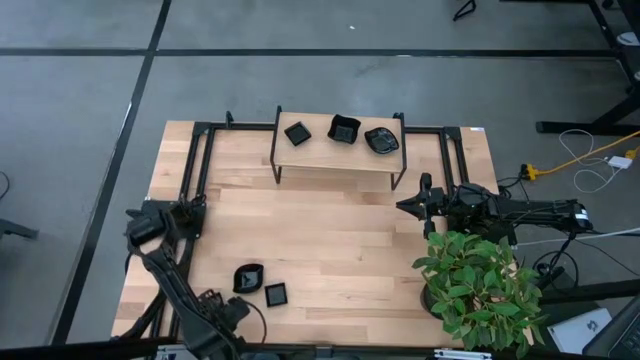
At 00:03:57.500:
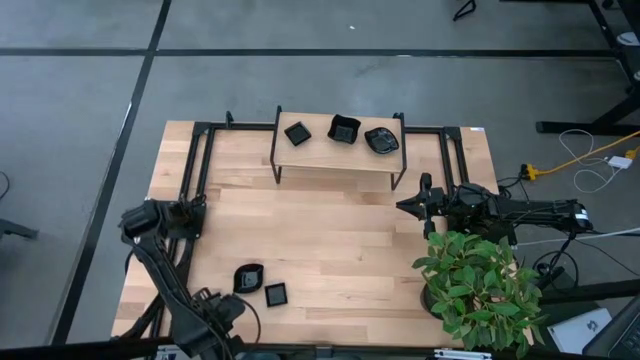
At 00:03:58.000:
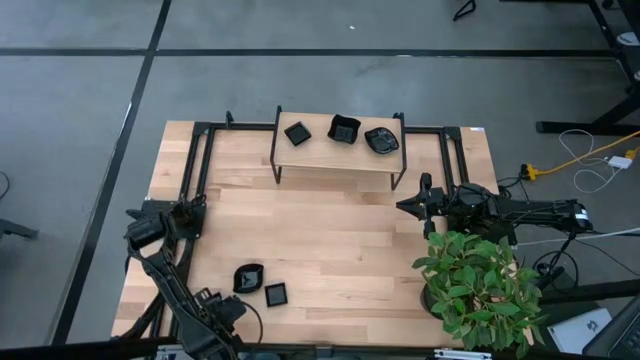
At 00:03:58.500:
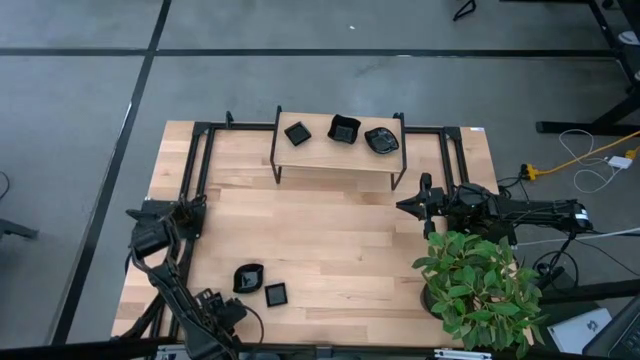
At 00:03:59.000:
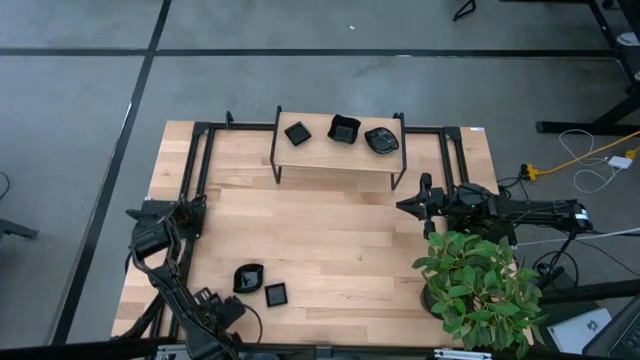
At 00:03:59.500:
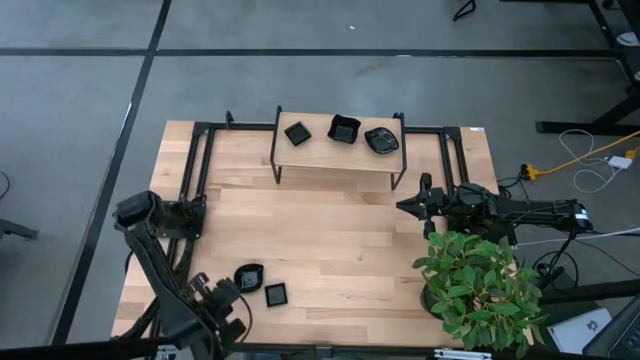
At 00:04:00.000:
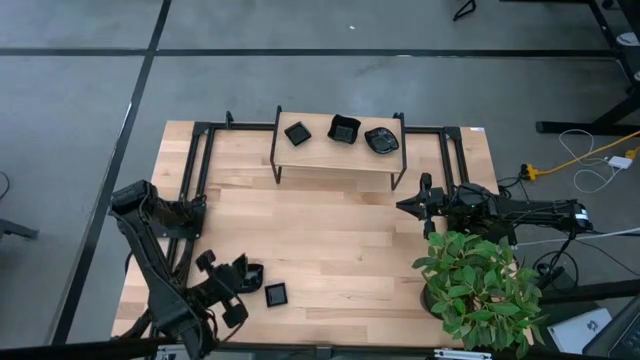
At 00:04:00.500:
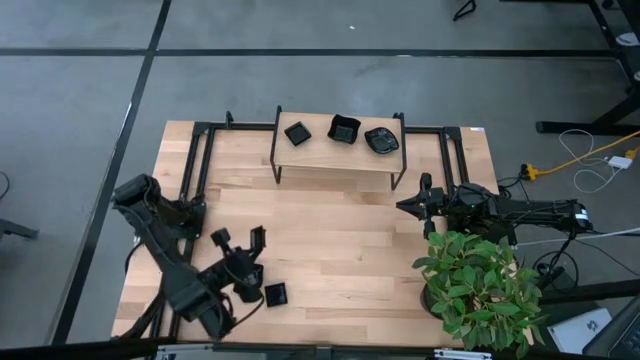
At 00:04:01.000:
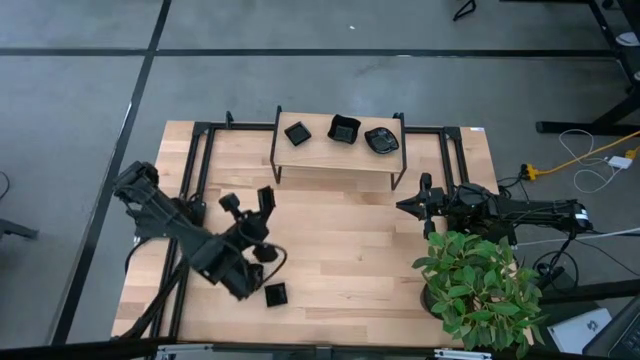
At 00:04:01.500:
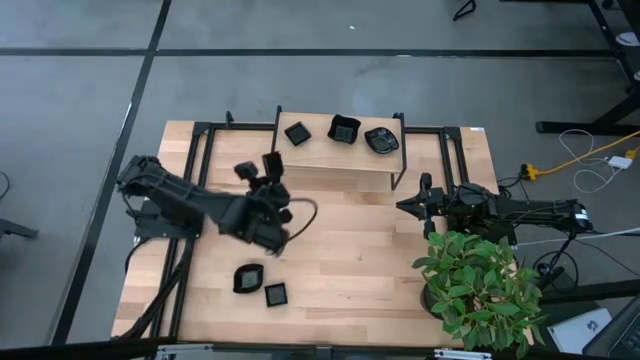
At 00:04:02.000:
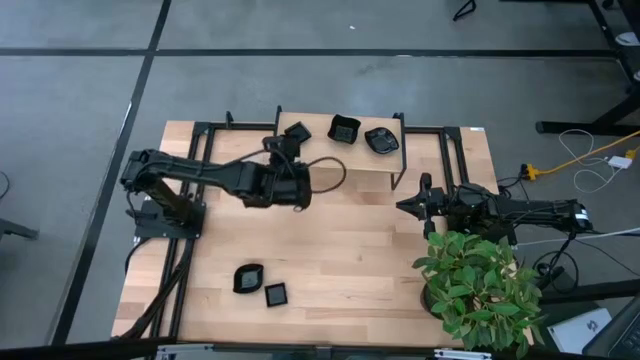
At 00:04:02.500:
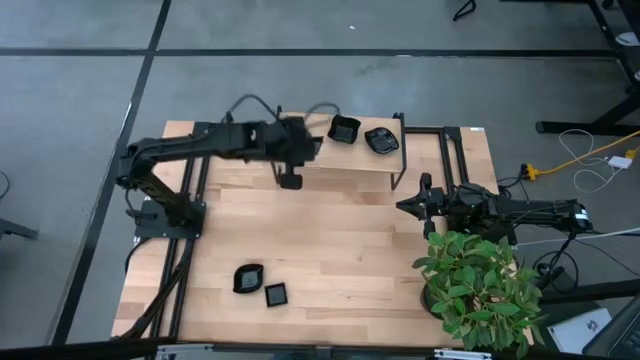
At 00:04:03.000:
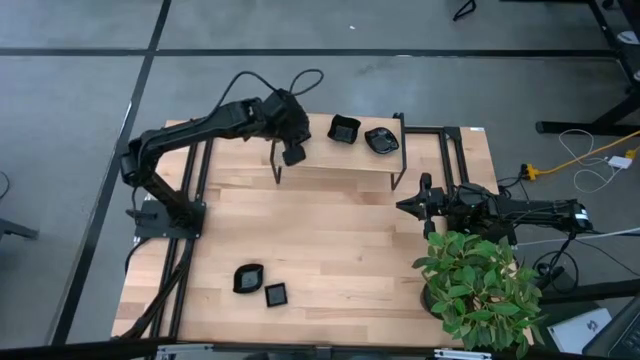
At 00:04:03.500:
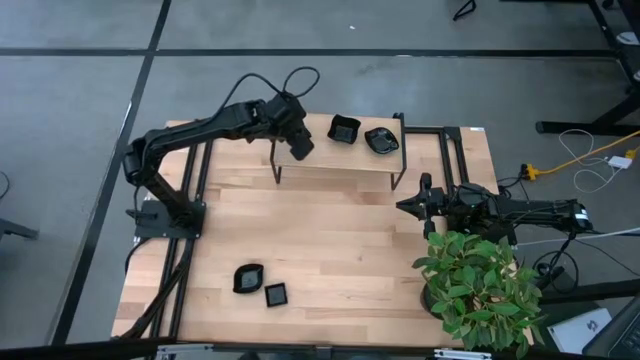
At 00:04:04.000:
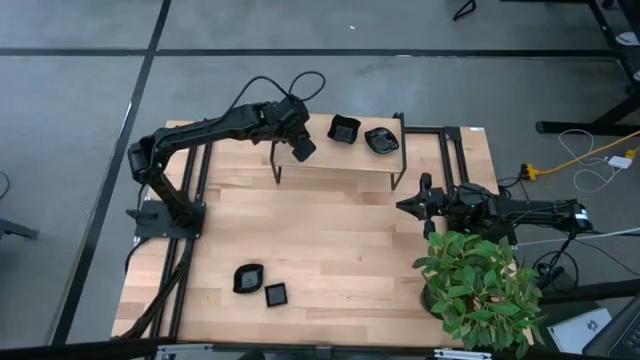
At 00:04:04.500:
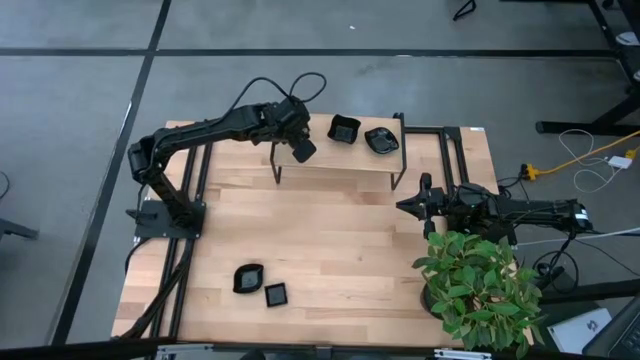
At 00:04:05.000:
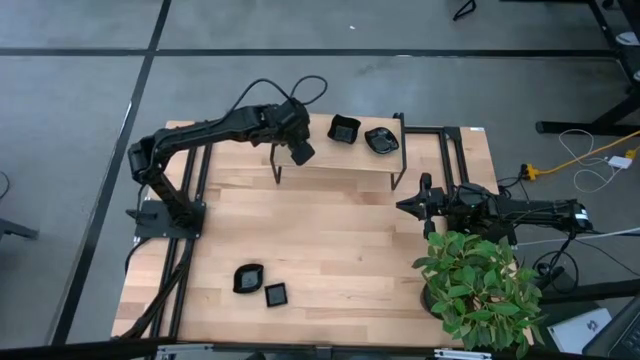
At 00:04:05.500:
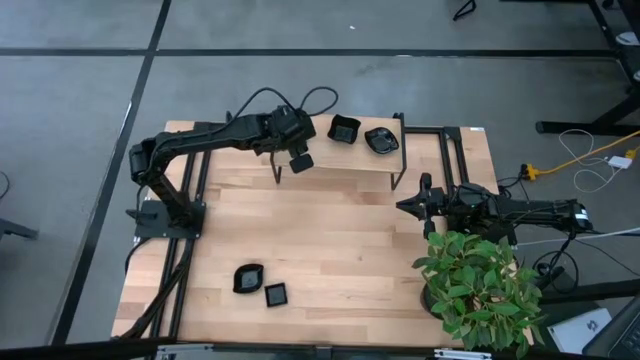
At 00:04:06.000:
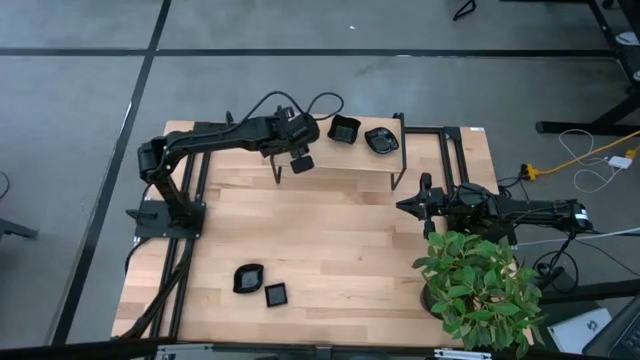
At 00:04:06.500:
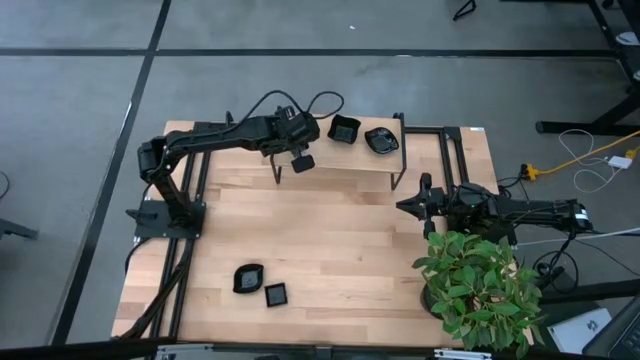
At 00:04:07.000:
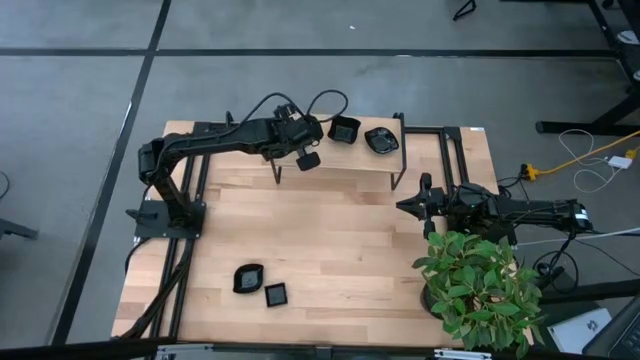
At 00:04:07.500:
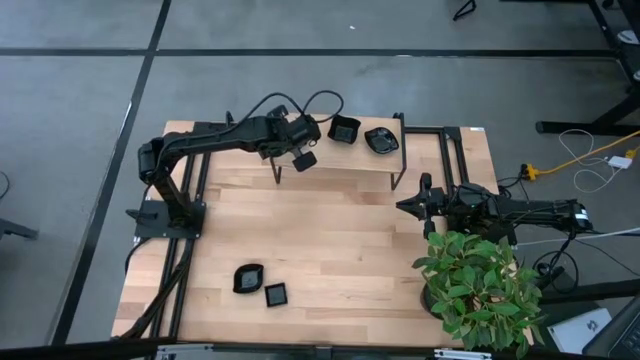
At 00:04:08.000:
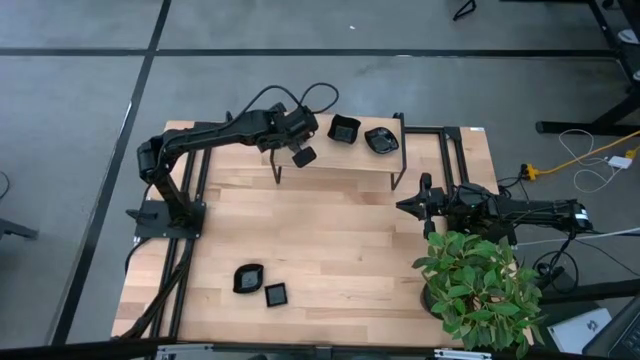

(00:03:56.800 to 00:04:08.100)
Task: Pick & Place Mini shaped plates
Stack the square plate on top of the square plate on the shelf

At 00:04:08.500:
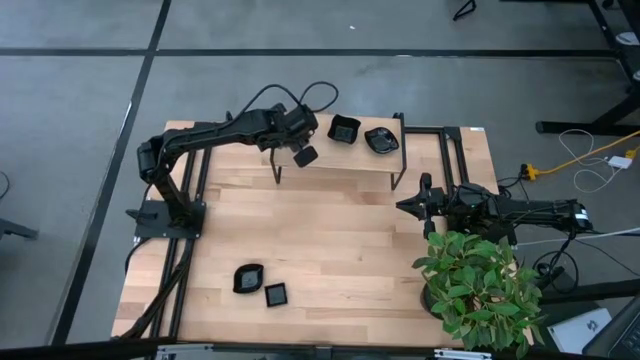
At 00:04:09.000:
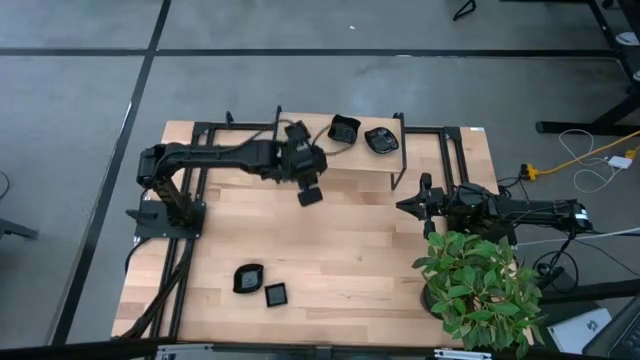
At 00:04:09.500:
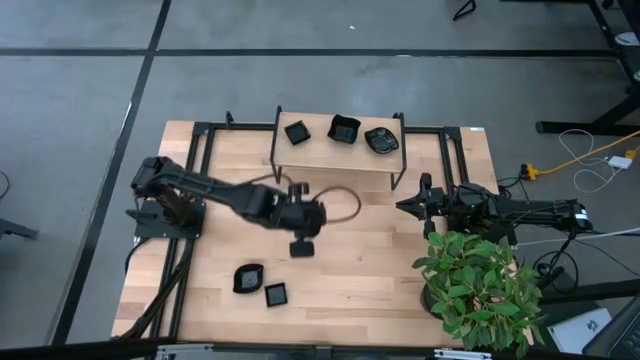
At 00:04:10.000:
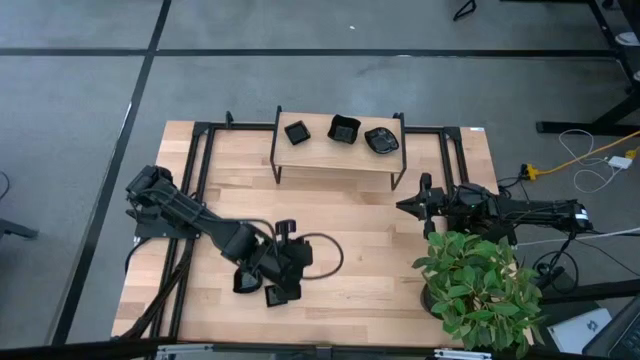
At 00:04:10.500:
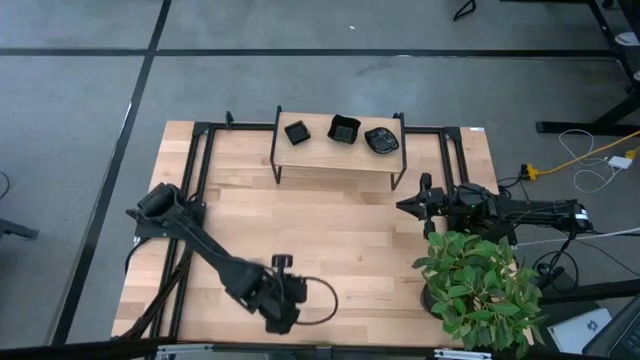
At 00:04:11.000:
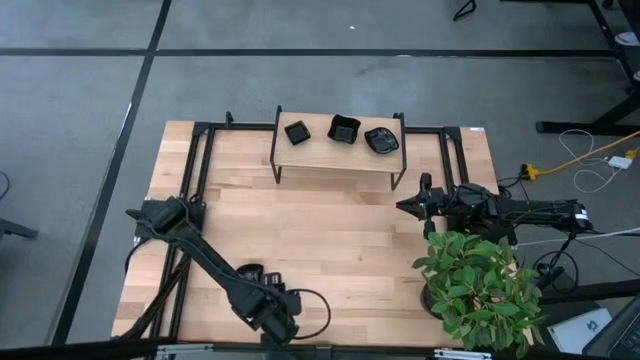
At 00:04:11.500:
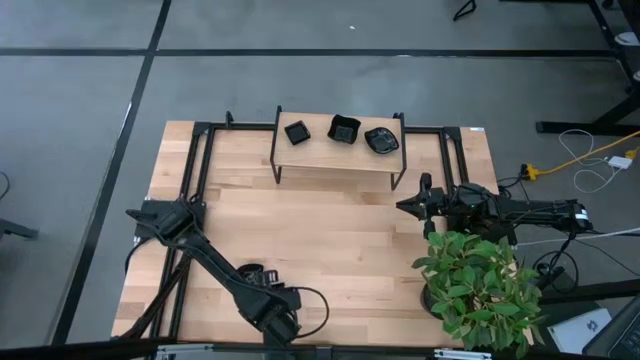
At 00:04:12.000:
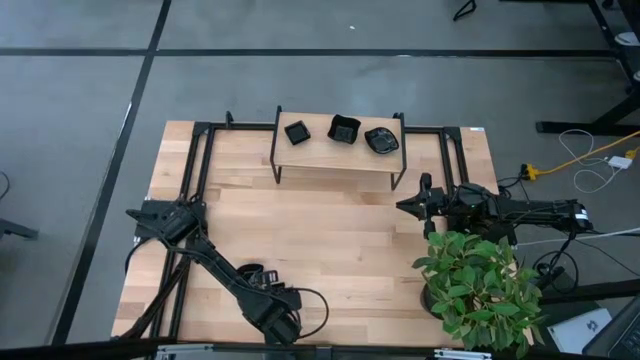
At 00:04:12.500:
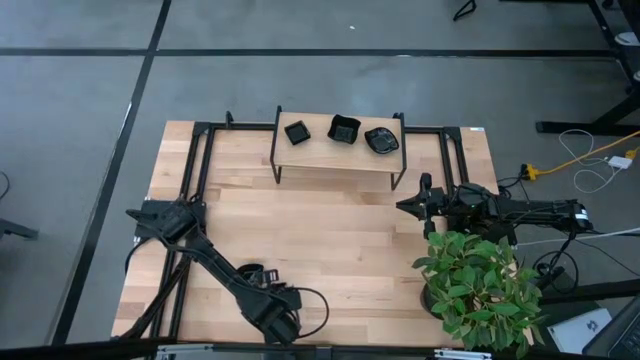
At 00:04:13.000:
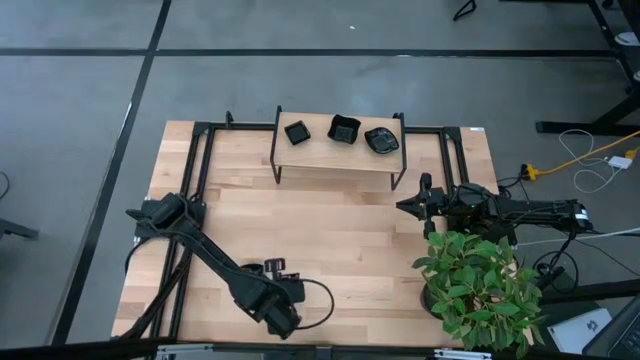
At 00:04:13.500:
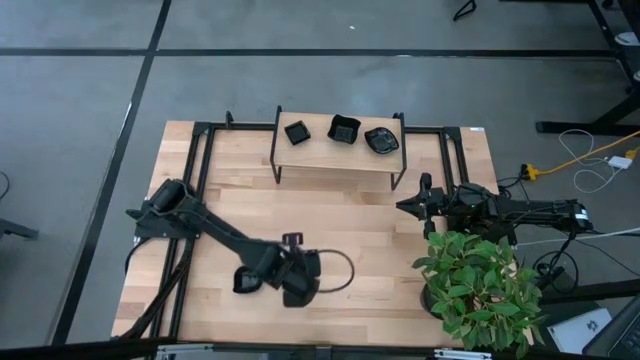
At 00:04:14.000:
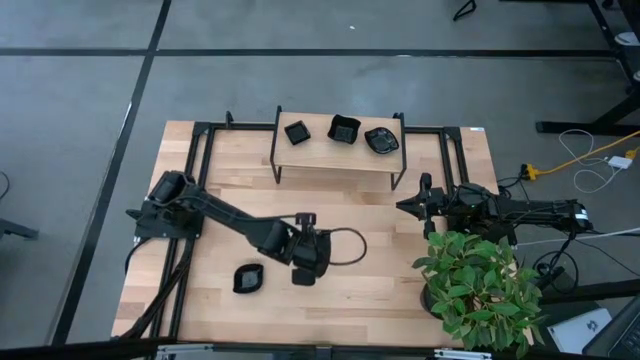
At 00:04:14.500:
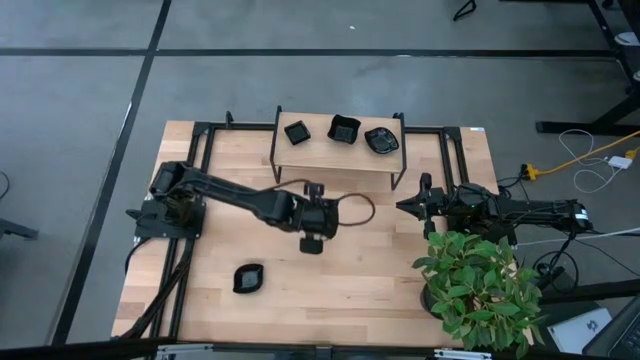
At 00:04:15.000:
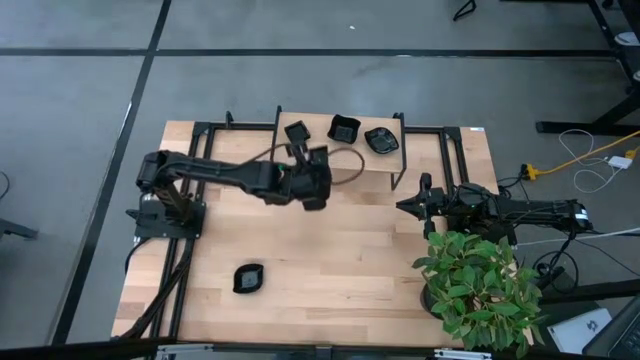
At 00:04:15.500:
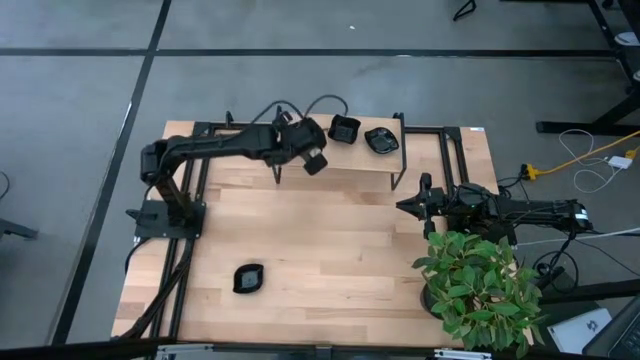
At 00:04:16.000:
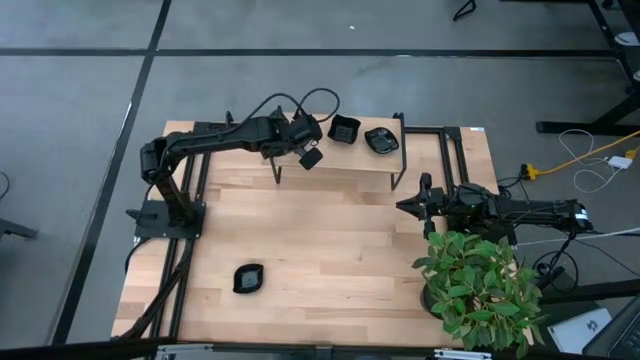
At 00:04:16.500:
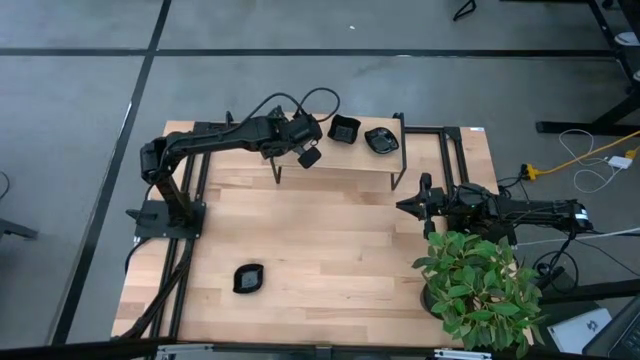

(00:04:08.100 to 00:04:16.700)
Stack the square plate on top of the square plate on the shelf

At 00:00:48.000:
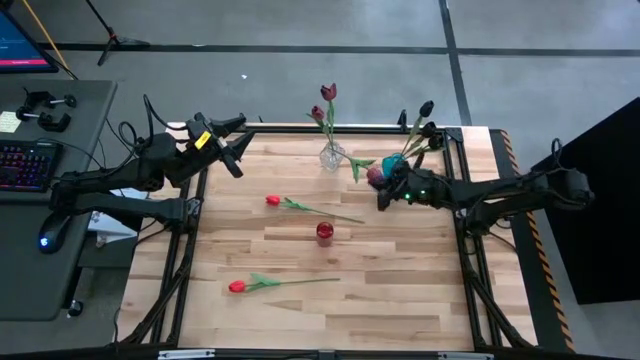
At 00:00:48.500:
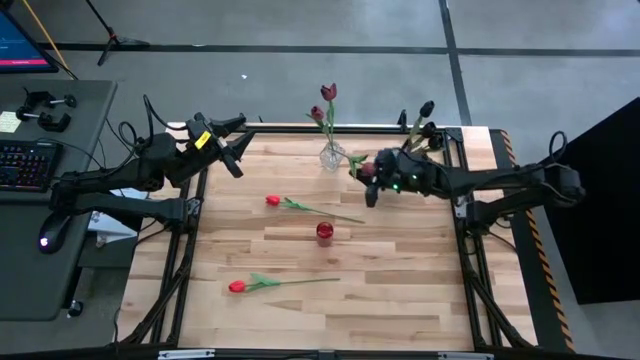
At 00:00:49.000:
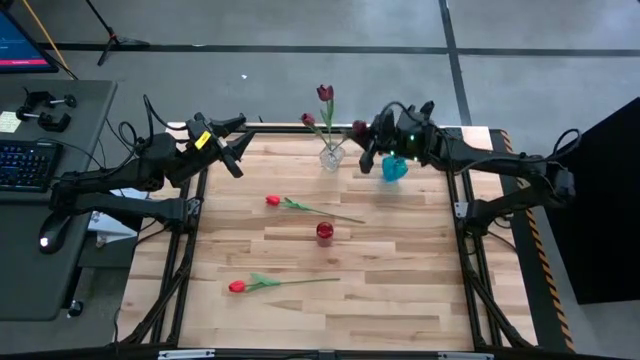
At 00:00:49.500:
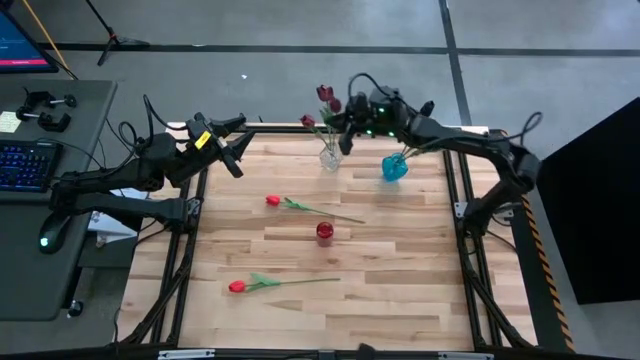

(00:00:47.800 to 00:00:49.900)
Task: Sort flowers into vase by color
Adjust the dark red flower
